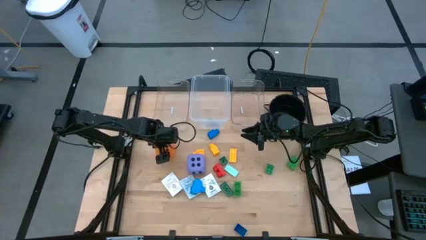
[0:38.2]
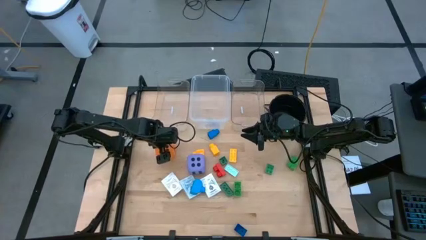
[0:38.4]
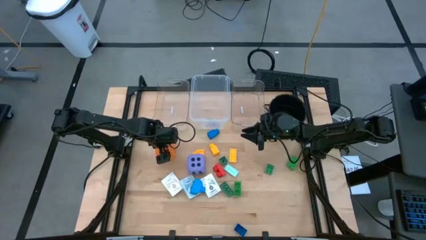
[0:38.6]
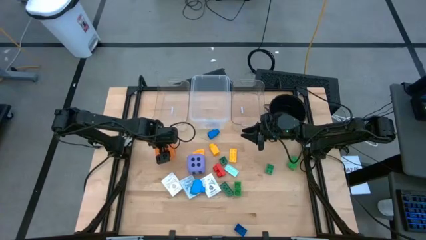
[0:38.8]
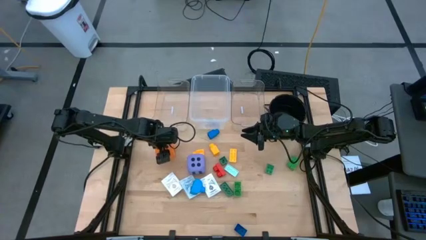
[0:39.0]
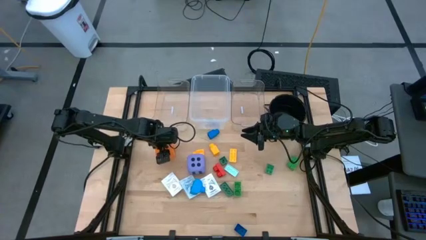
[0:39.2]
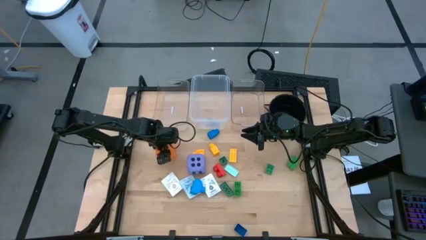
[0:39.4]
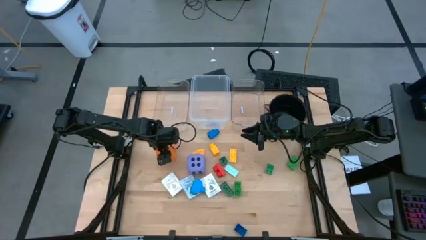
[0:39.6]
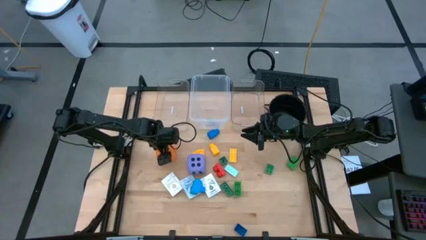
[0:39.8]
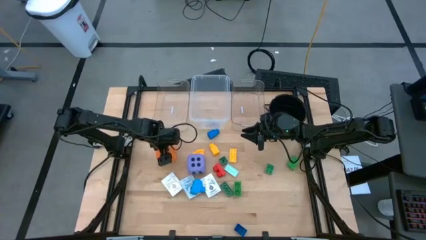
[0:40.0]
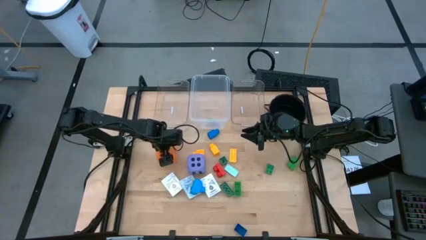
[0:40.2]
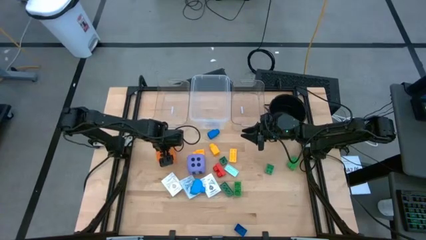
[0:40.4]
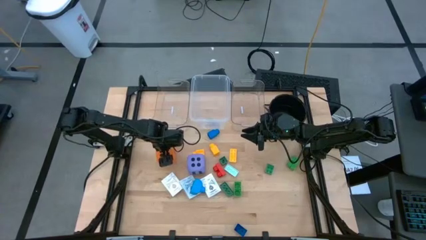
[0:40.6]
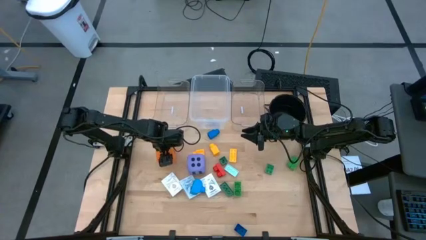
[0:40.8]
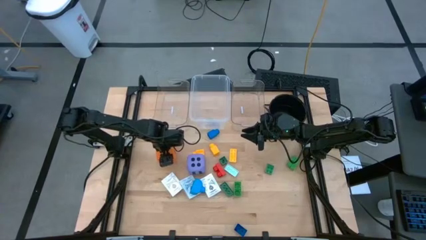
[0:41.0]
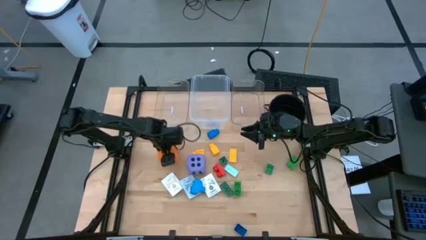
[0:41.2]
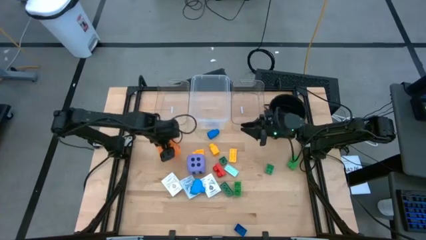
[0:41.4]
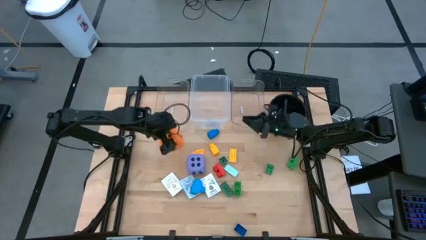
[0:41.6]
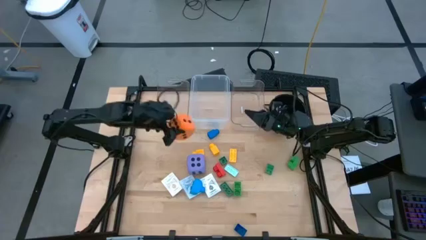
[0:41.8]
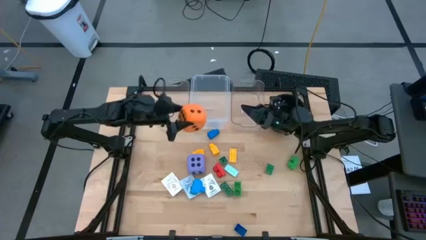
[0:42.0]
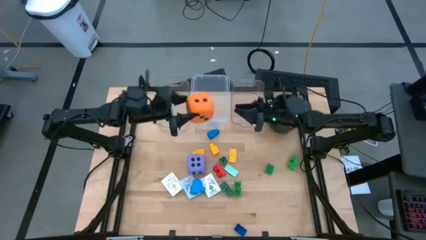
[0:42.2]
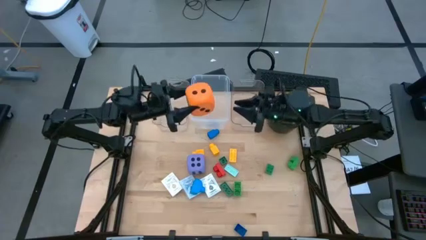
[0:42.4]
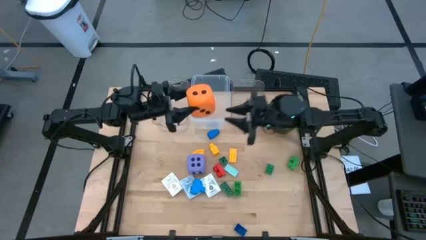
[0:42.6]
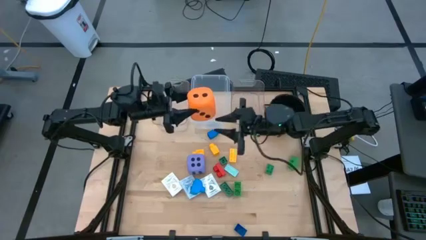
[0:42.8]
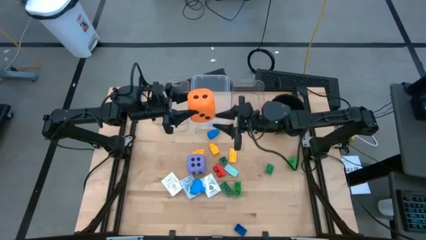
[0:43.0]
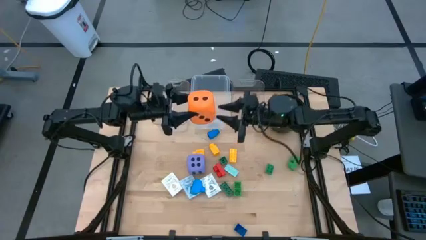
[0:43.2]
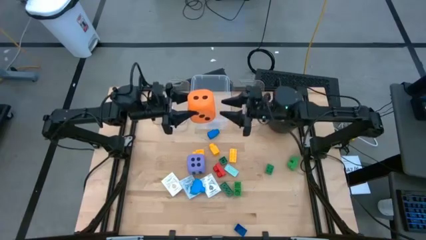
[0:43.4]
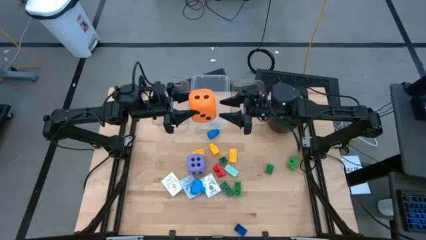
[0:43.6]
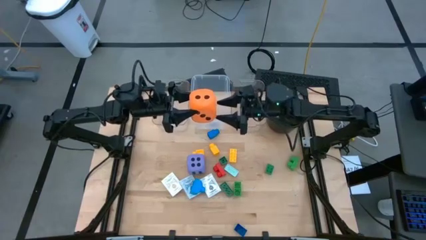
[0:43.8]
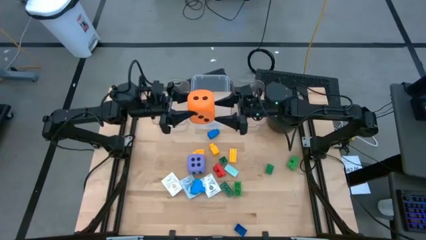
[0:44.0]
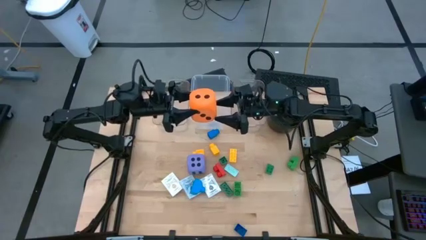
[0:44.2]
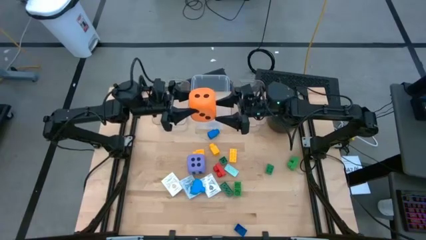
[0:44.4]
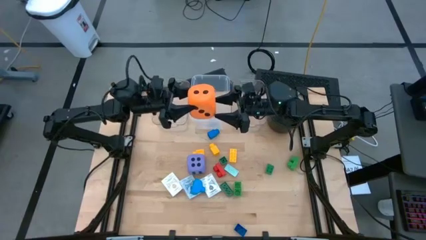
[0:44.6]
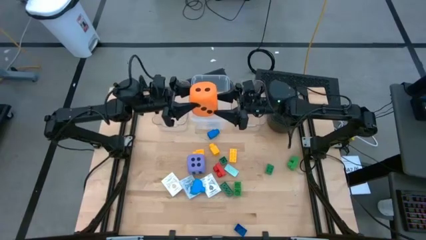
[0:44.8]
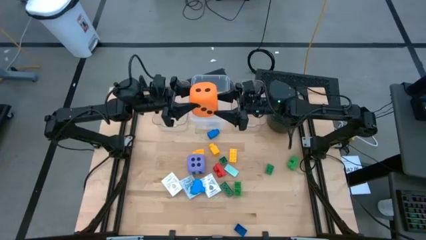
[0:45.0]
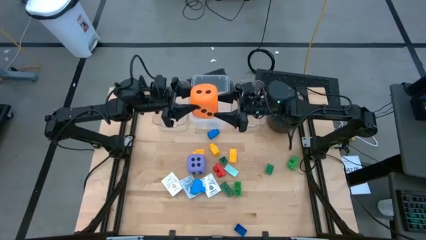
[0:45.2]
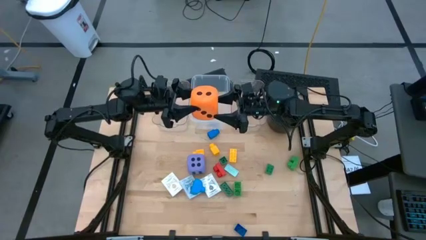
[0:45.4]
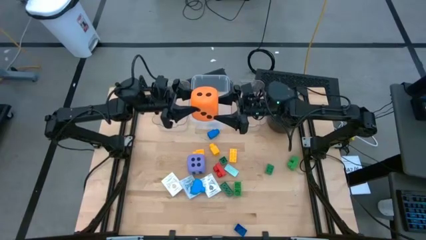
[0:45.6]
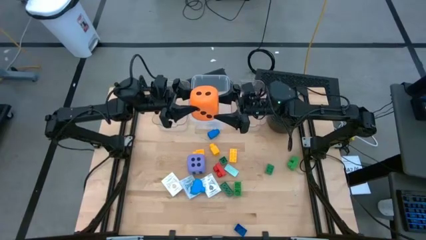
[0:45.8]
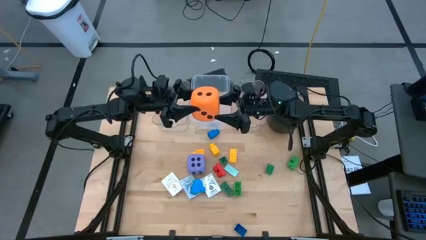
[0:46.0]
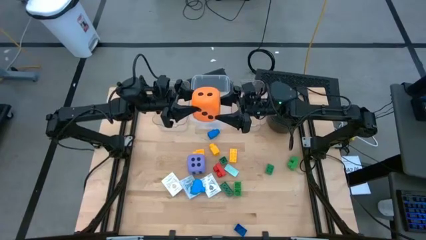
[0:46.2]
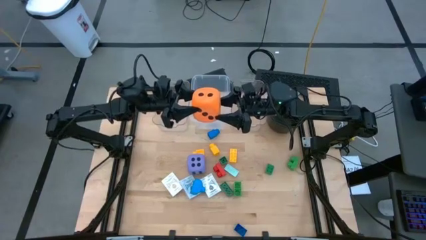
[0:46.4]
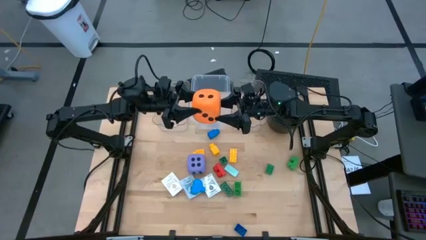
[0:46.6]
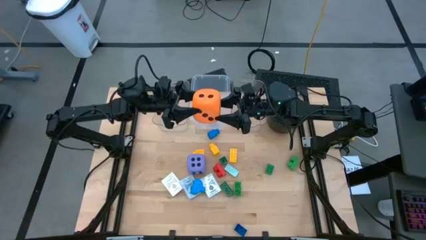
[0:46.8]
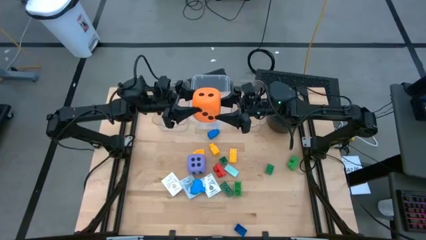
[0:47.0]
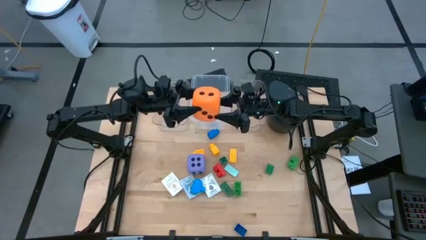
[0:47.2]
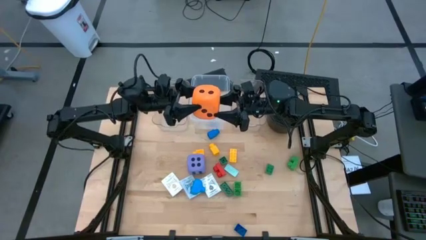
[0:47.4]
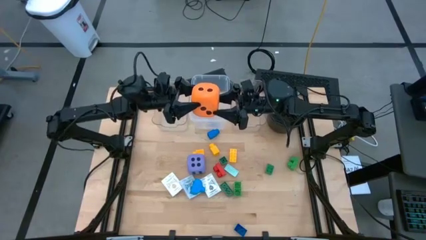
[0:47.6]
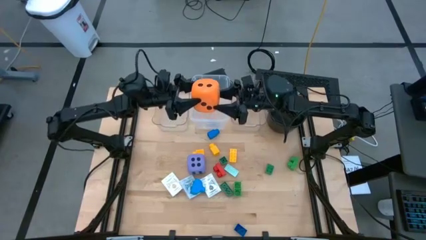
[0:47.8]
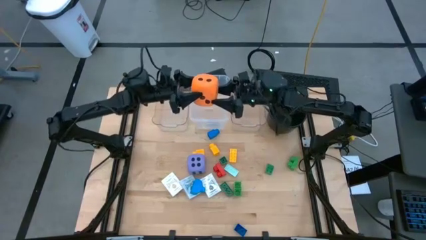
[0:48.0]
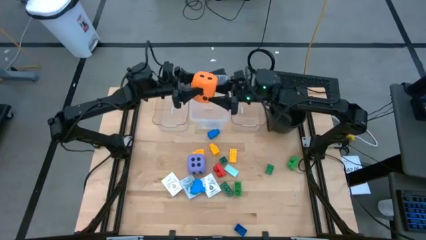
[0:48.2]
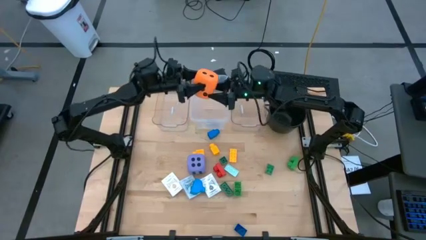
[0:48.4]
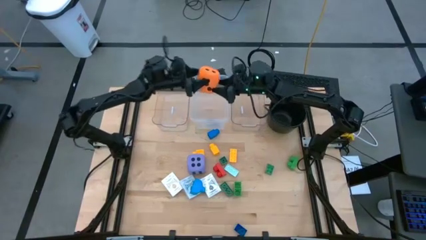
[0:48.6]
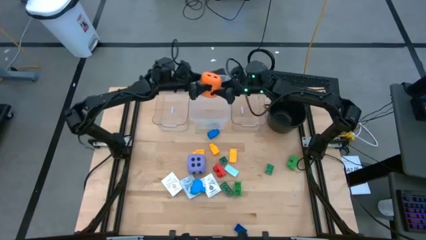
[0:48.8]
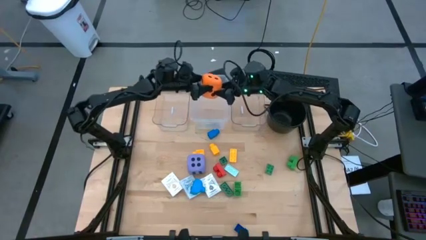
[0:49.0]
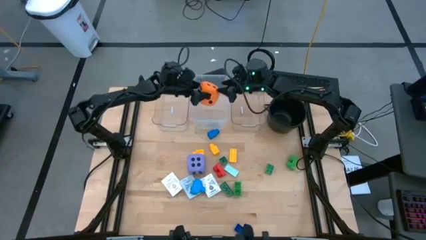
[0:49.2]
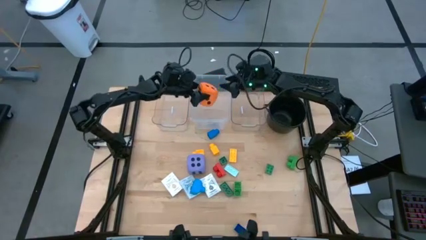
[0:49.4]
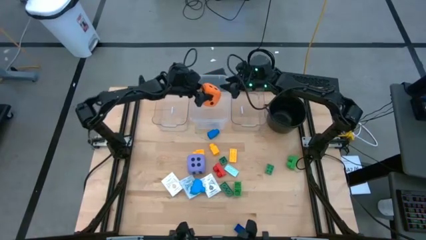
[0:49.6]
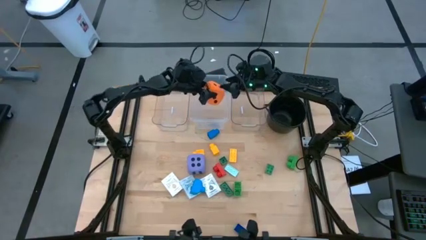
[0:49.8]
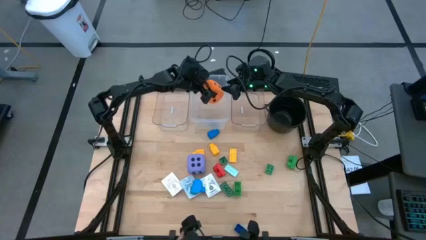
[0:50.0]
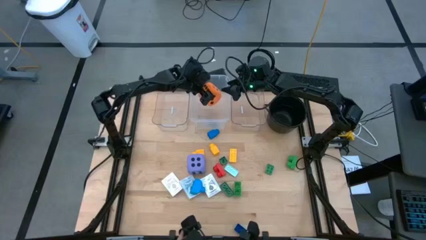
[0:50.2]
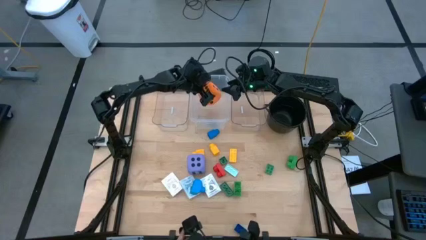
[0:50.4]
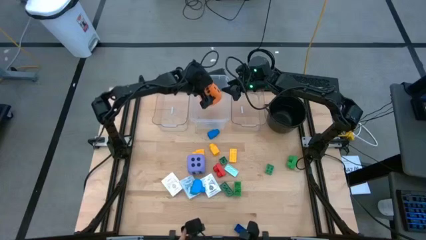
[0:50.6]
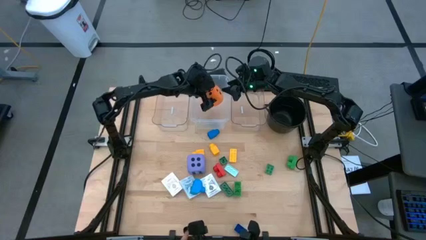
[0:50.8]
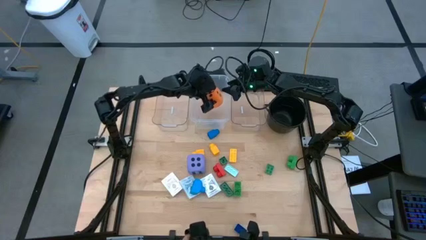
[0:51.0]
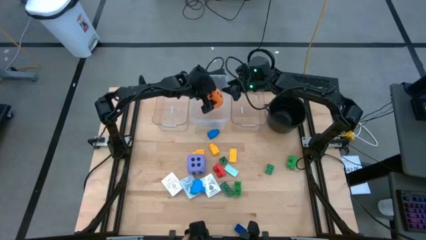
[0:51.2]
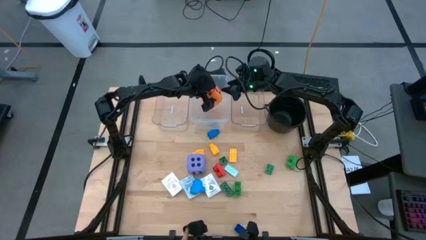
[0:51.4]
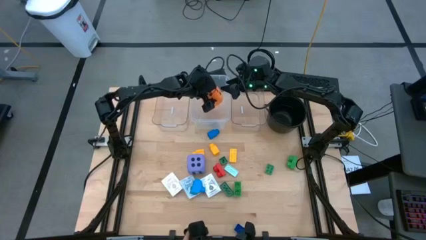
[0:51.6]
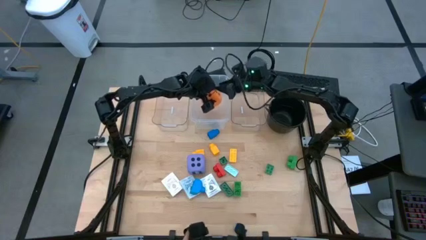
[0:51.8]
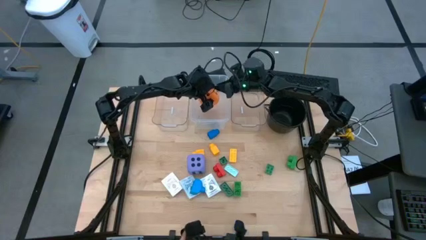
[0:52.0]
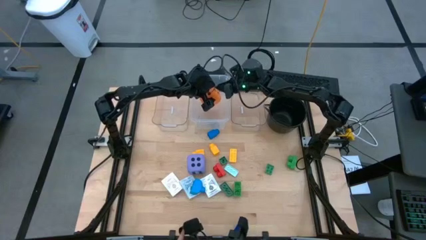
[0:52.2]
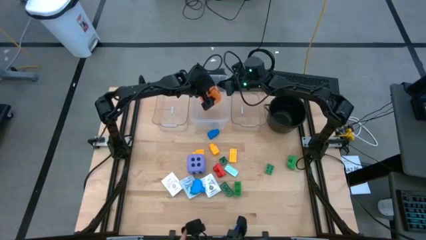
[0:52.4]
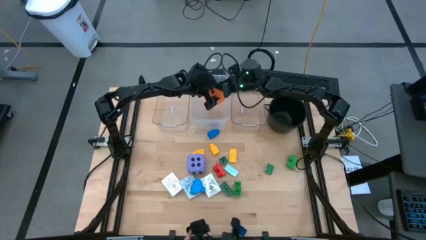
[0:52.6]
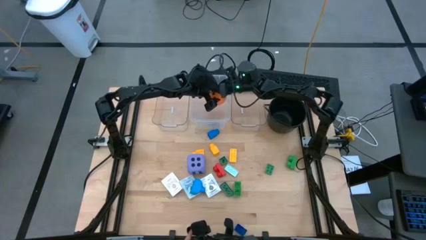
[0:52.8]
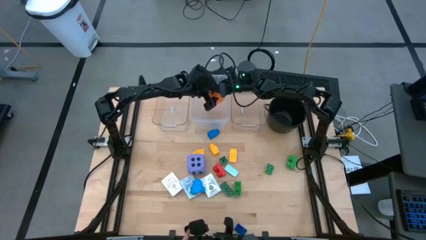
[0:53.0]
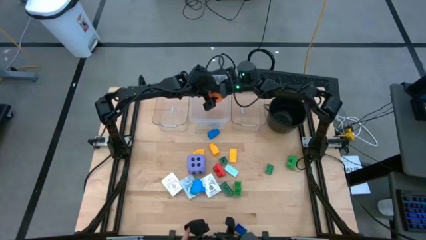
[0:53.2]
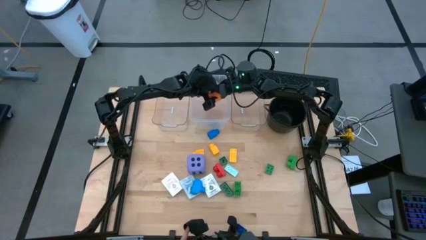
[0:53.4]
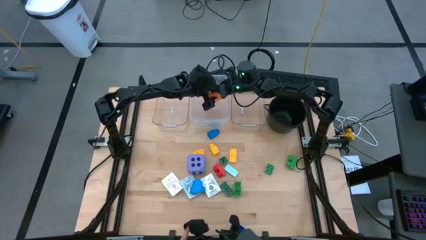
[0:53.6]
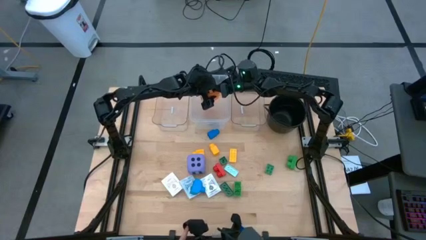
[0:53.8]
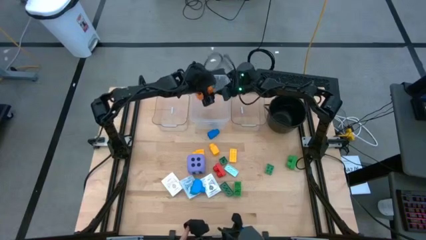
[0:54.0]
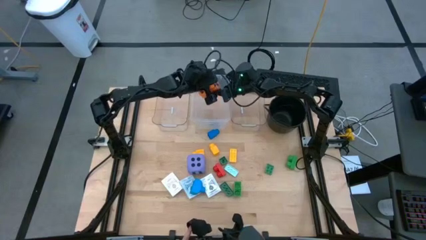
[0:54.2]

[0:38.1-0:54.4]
Task: Pick & Place Toys
Put the orange dice into the transparent container
